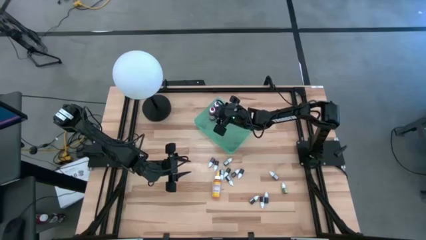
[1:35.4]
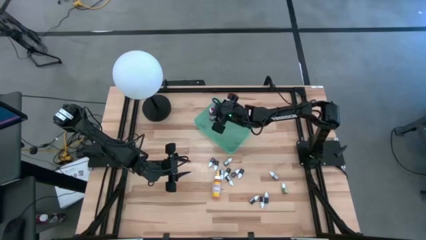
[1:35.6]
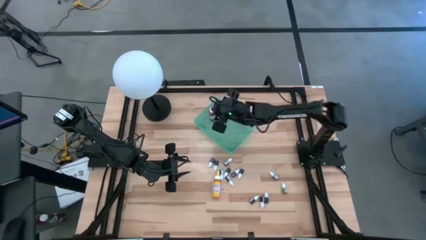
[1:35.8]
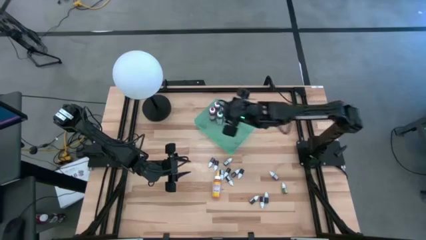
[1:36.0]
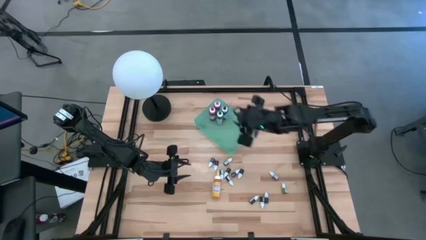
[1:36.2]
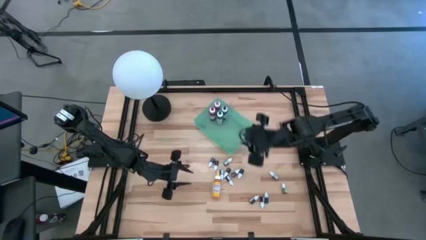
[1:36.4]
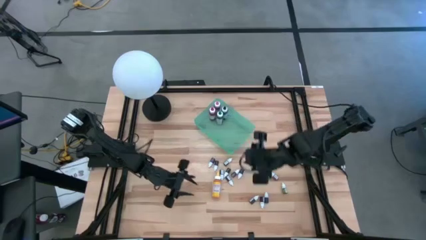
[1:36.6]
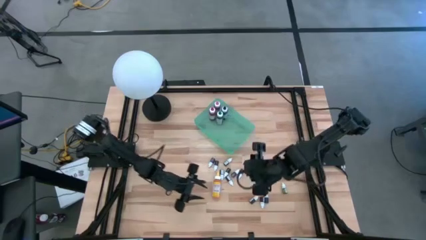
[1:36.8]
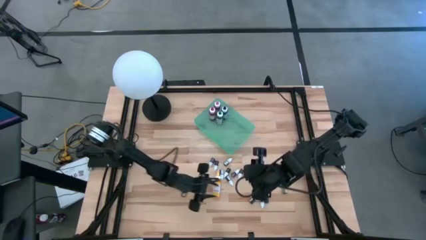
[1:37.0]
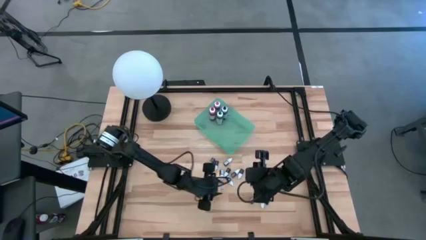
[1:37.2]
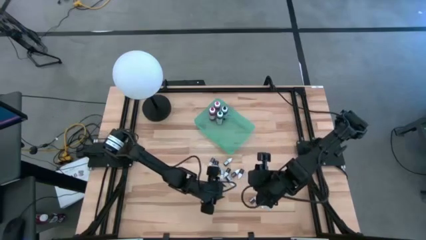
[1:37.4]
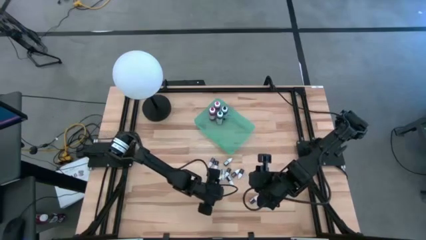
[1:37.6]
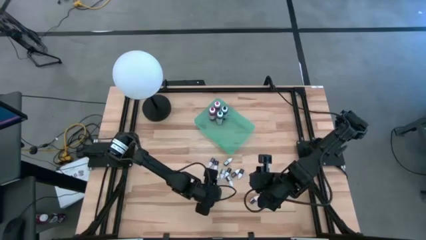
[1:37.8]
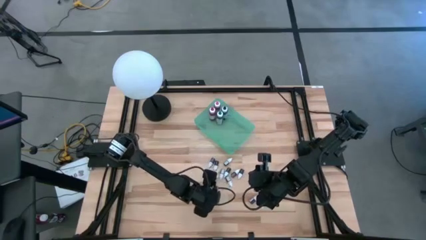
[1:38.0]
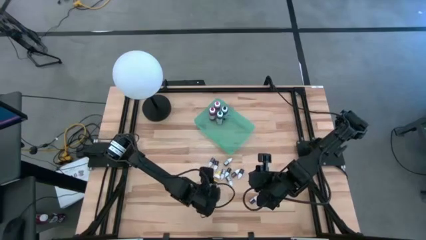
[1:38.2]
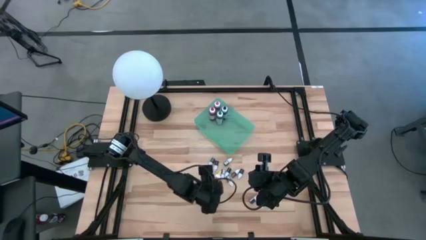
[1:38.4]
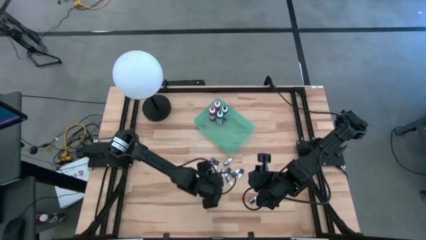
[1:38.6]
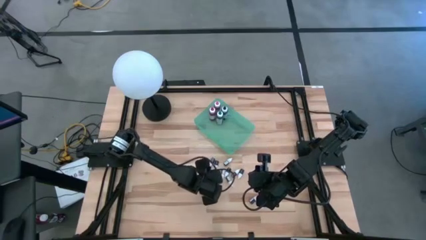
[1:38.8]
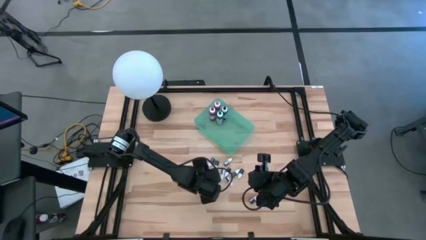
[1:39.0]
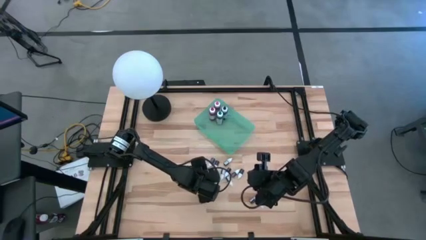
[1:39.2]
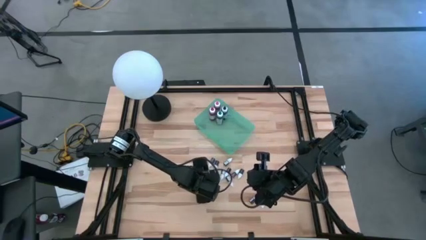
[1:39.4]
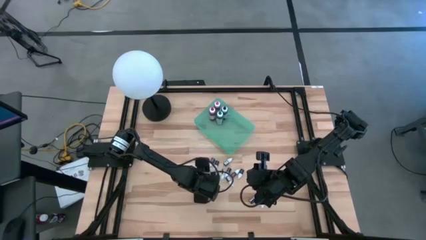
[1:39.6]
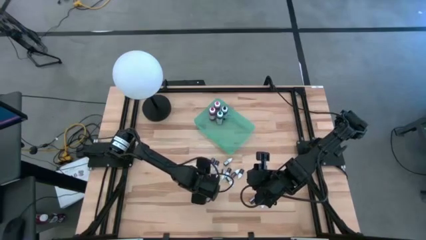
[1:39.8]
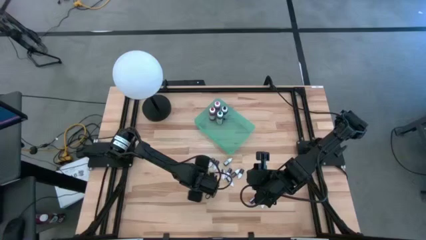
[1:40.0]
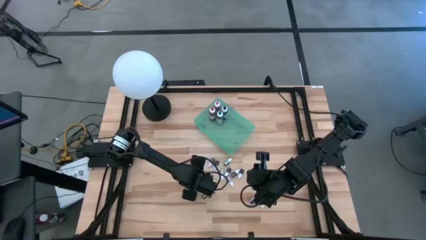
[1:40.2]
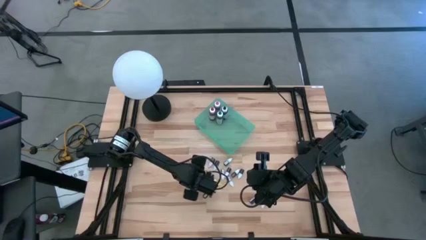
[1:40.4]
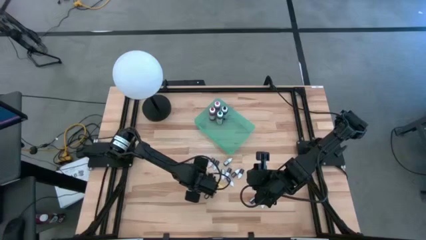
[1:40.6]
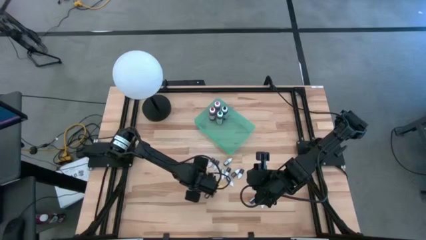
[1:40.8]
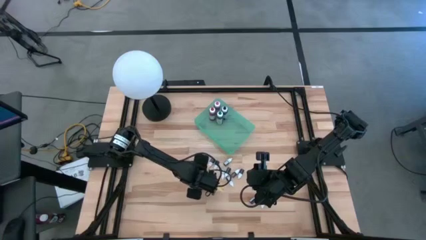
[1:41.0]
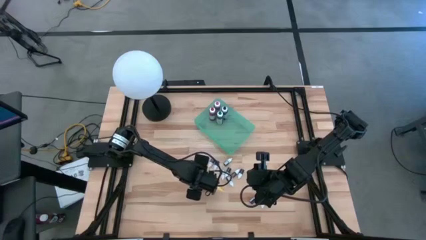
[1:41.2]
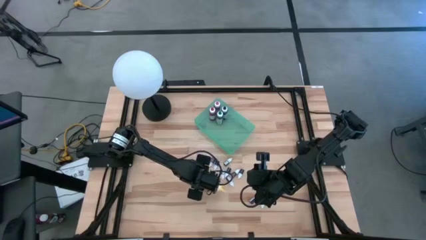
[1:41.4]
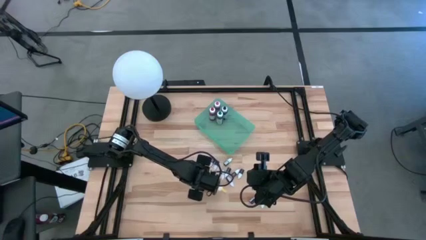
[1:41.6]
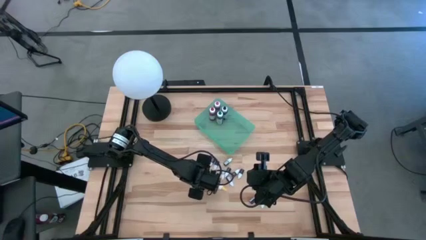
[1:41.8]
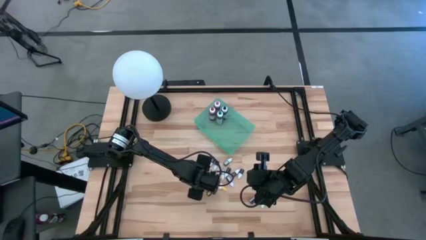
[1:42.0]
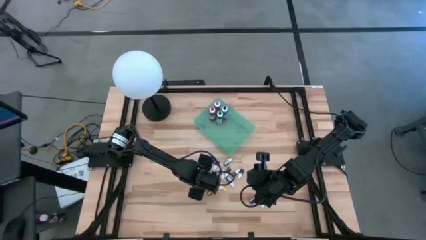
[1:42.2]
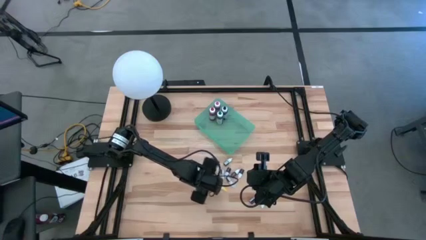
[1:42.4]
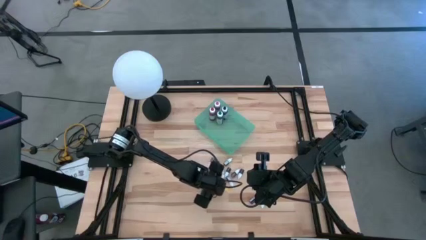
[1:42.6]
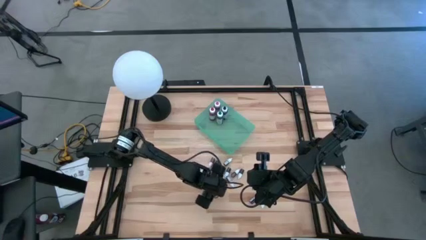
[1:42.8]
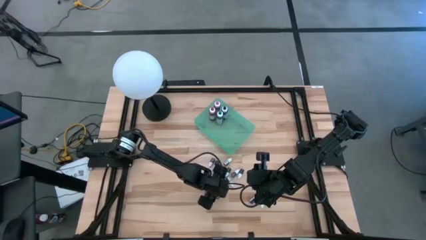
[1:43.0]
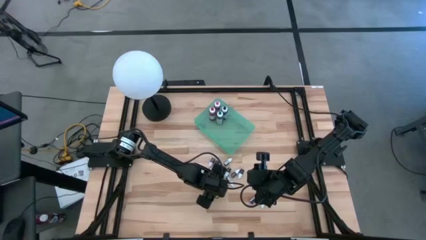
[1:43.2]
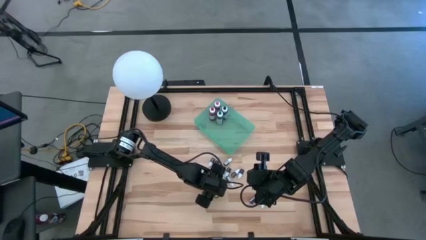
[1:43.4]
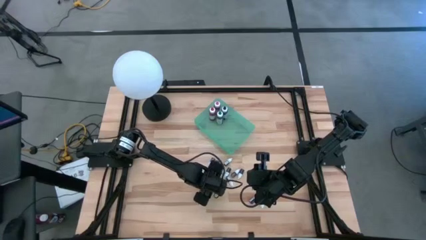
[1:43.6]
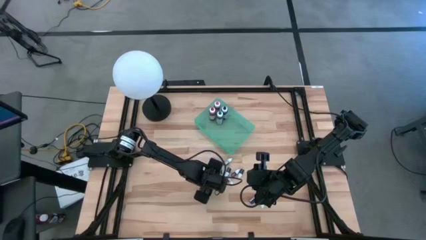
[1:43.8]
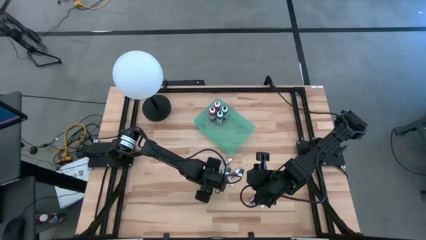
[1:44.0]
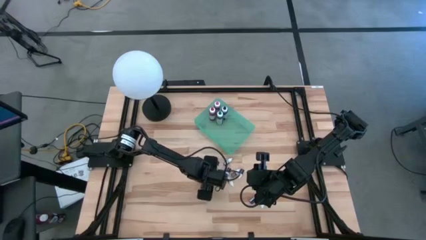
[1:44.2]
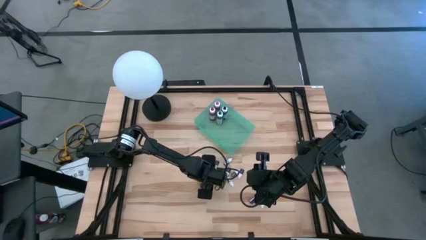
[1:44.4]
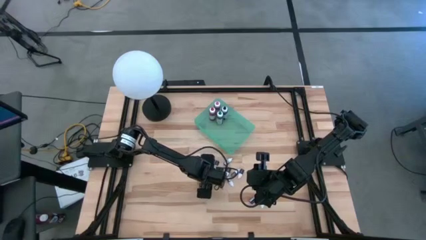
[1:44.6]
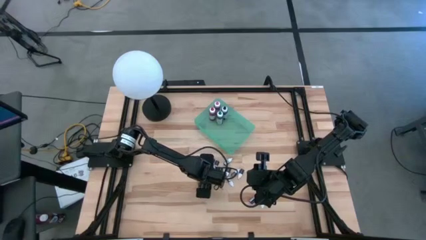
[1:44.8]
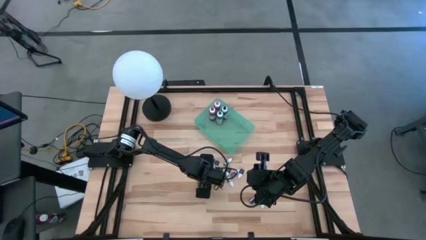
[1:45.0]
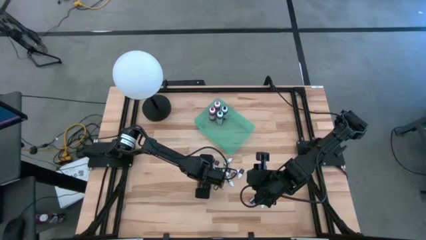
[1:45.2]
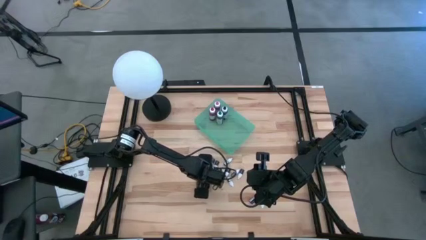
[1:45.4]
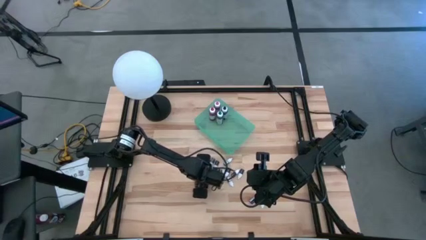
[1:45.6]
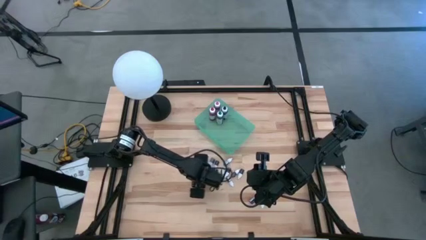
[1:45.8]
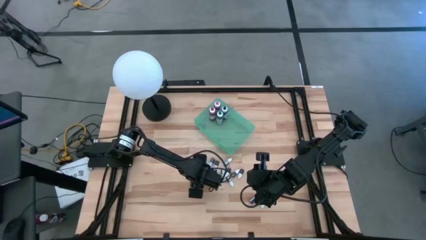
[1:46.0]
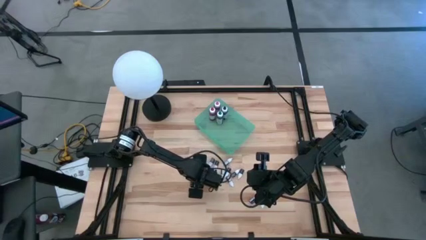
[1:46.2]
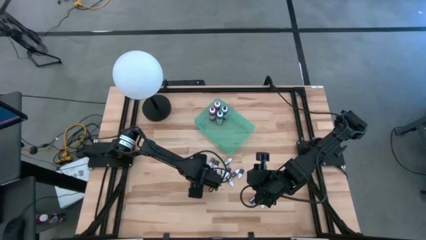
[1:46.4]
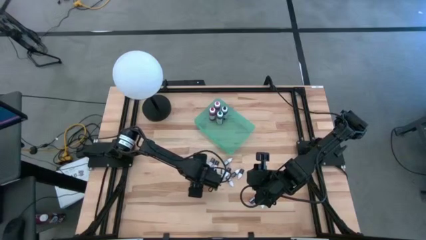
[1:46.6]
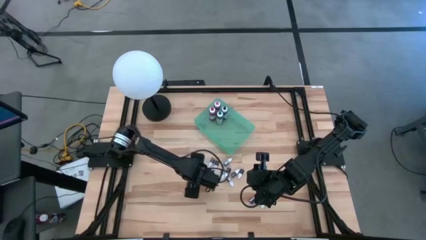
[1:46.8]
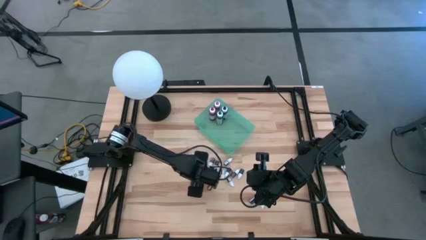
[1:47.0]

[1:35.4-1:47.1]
Task: Pick & Place food coloring
Put the large yellow food coloring bottle into the green bin
